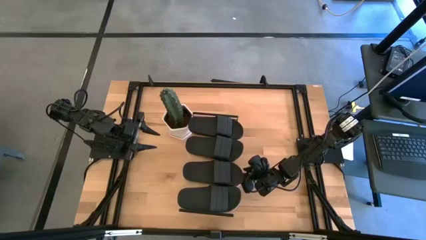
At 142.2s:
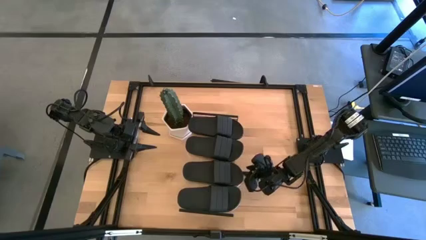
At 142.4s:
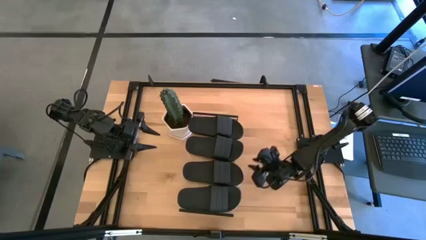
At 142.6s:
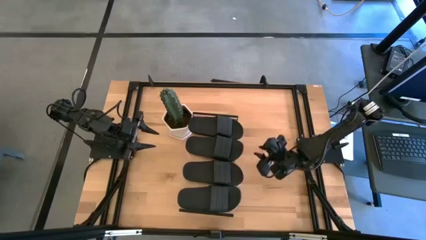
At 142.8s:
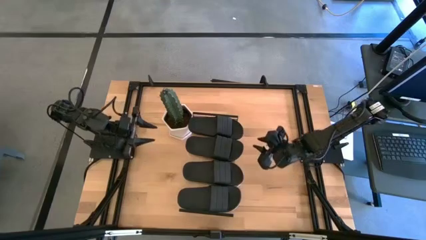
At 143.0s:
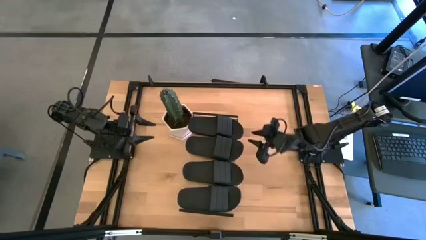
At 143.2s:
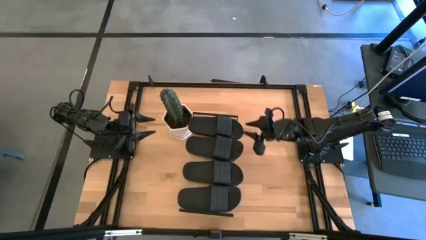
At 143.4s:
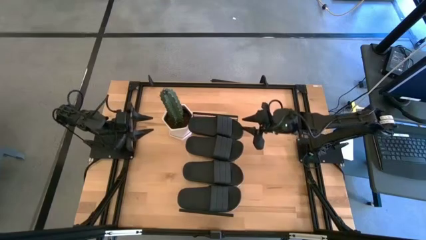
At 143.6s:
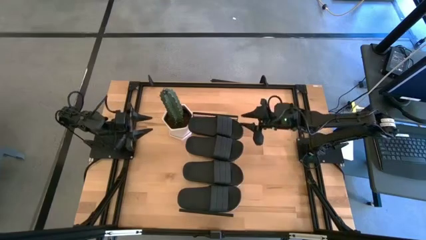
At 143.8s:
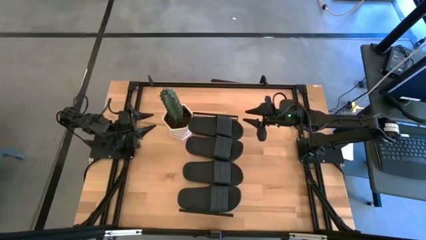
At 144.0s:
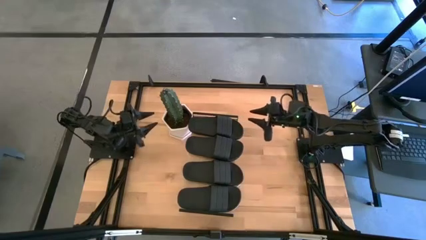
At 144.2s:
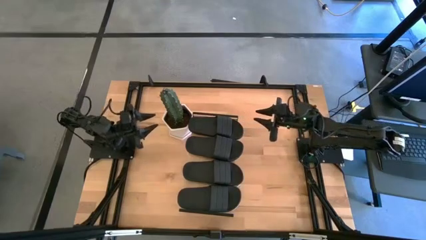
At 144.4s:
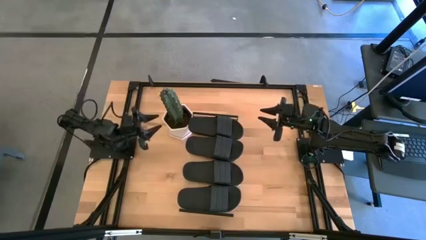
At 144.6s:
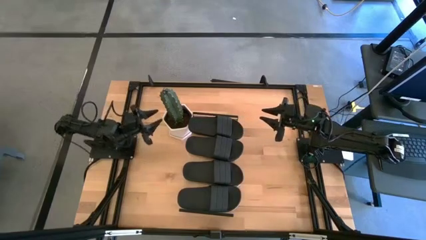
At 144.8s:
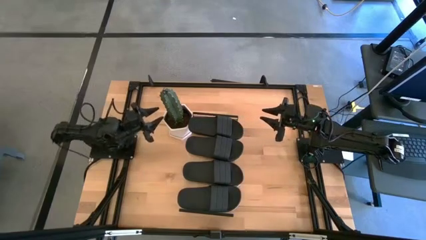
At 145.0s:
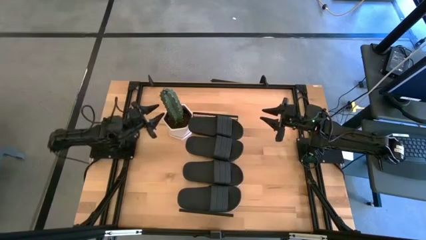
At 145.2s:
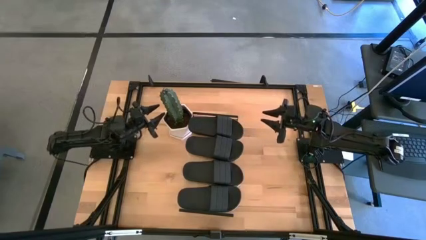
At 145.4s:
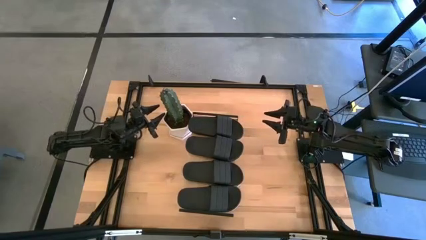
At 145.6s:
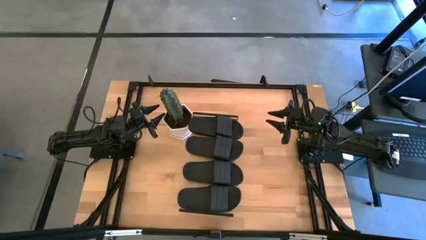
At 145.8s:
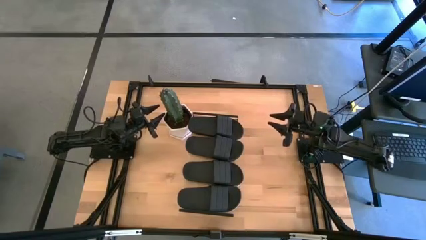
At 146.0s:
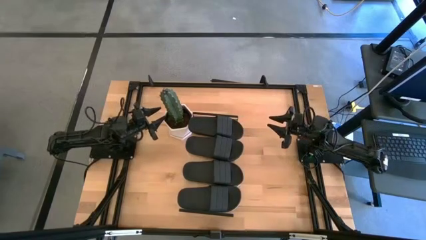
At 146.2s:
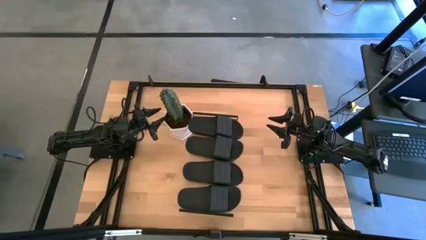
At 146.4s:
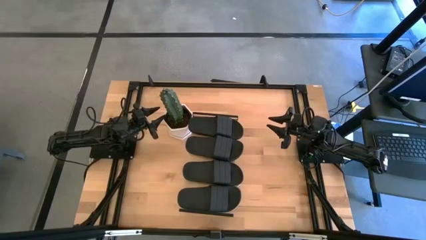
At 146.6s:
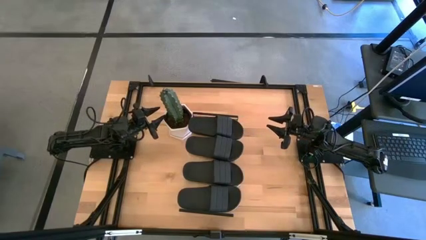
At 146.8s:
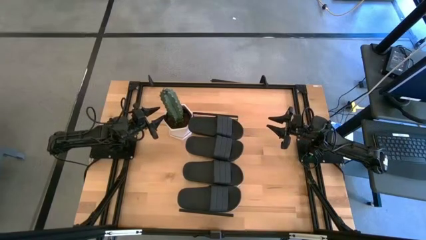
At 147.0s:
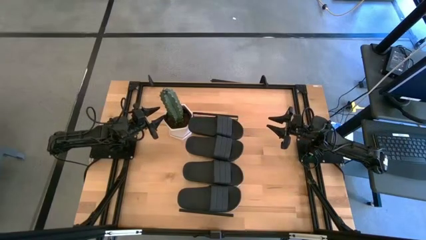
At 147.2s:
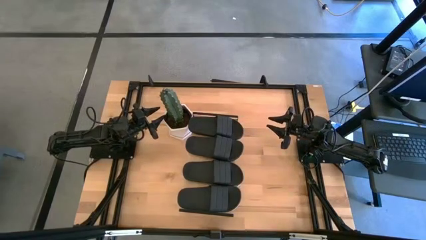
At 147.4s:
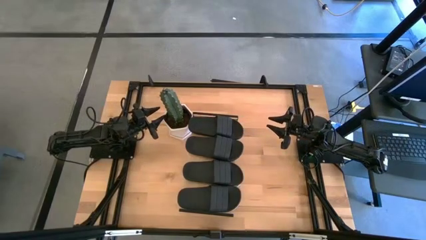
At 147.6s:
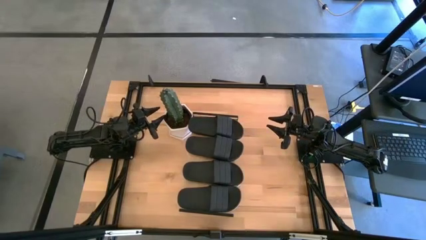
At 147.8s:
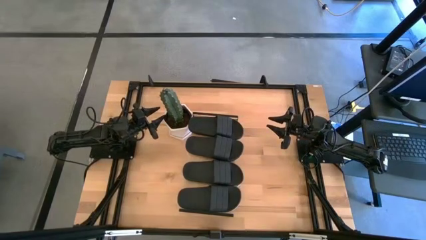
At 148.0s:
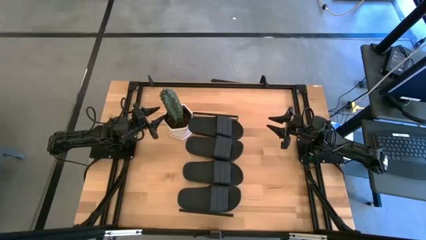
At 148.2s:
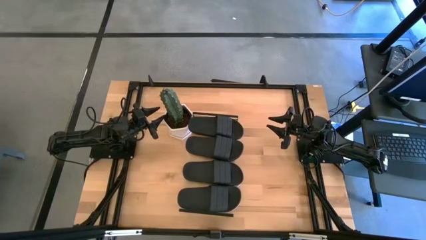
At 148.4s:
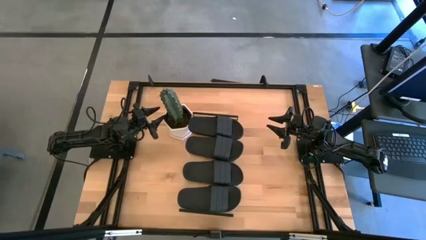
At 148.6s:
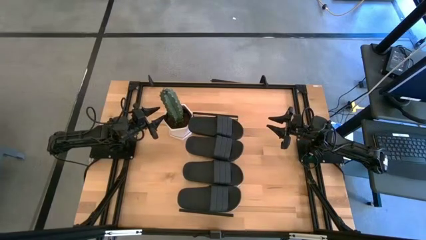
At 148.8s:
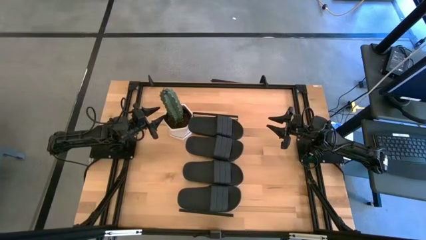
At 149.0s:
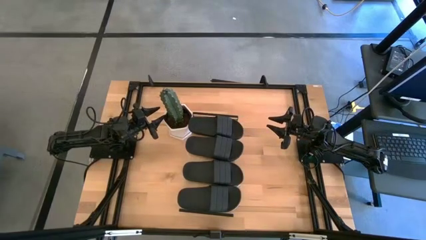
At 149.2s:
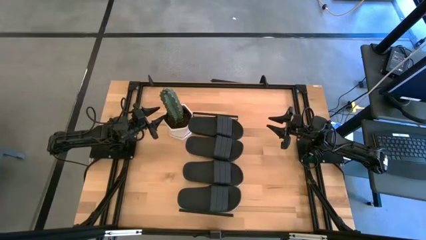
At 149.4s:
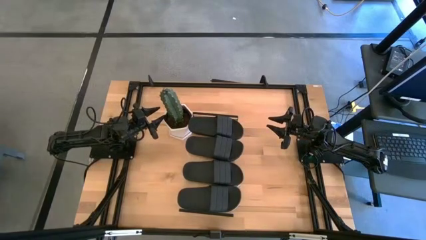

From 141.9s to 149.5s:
Task: Pick and place slides into the shelf
Return to Home Position

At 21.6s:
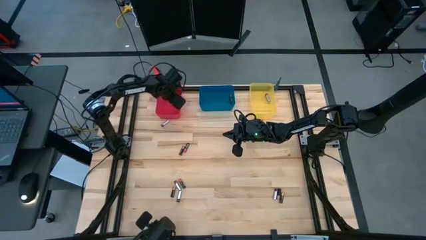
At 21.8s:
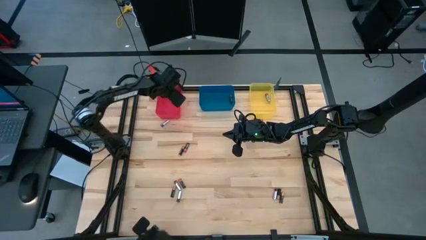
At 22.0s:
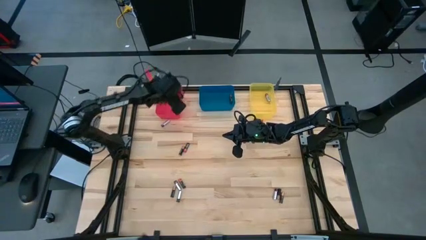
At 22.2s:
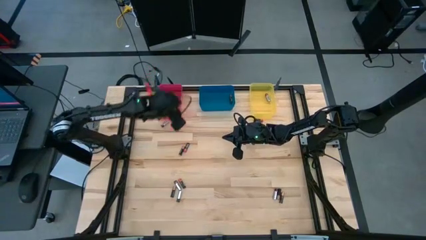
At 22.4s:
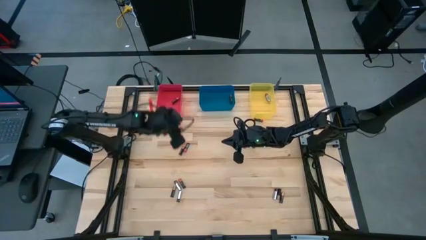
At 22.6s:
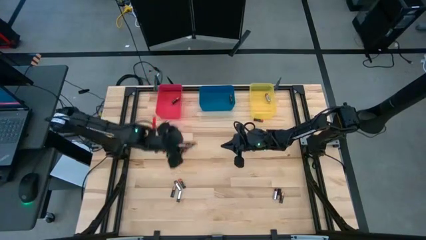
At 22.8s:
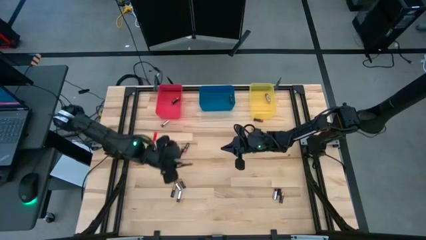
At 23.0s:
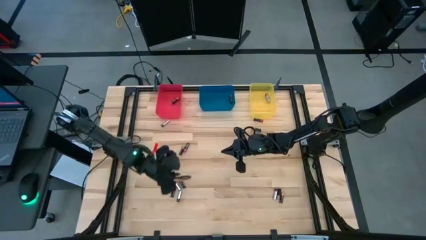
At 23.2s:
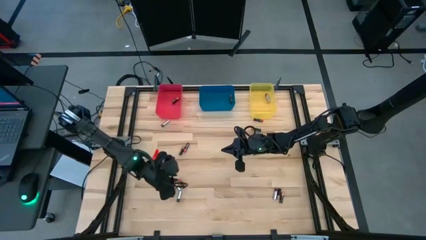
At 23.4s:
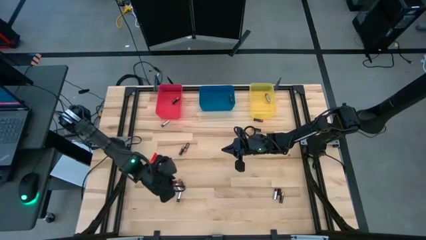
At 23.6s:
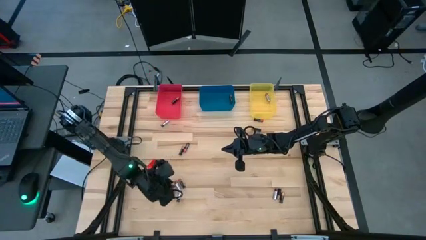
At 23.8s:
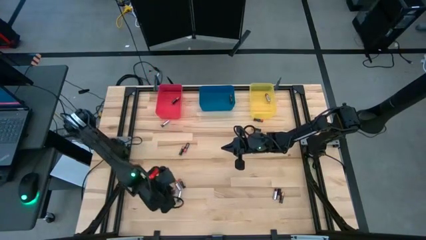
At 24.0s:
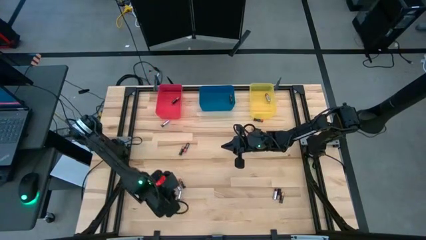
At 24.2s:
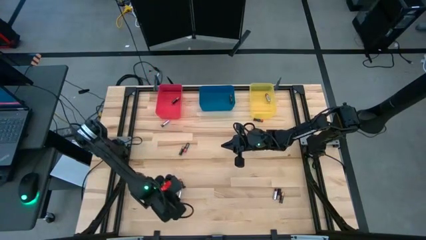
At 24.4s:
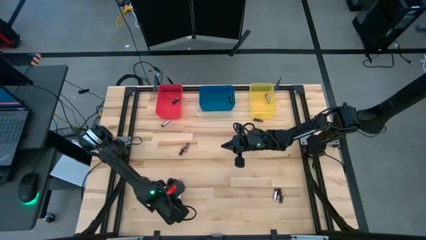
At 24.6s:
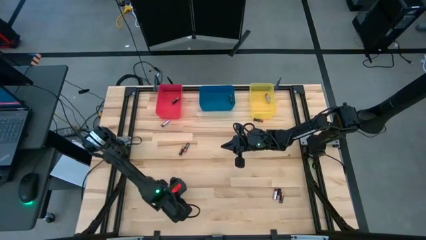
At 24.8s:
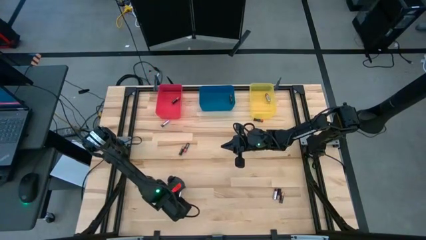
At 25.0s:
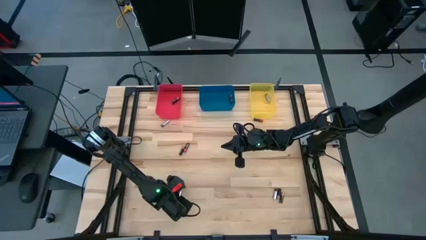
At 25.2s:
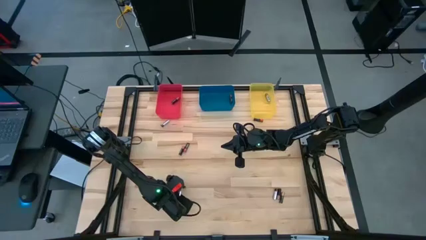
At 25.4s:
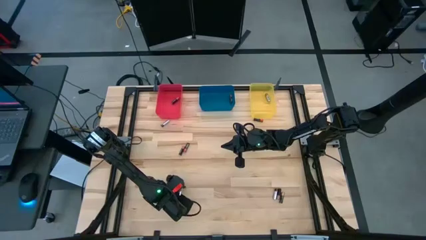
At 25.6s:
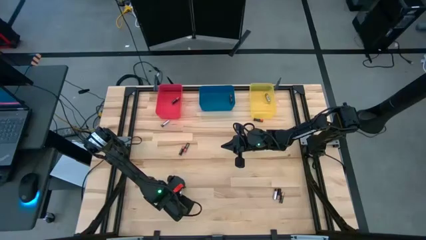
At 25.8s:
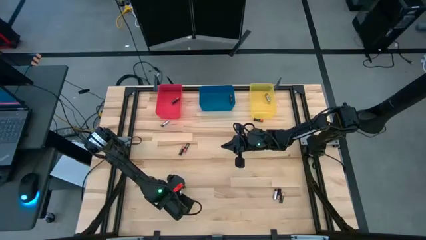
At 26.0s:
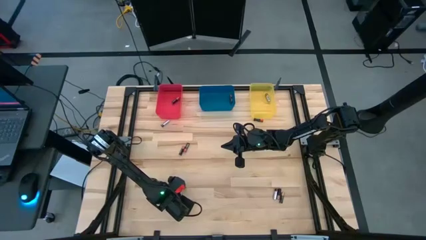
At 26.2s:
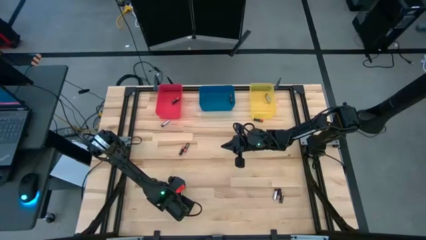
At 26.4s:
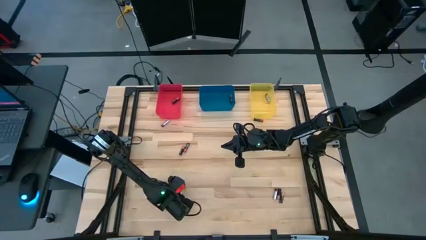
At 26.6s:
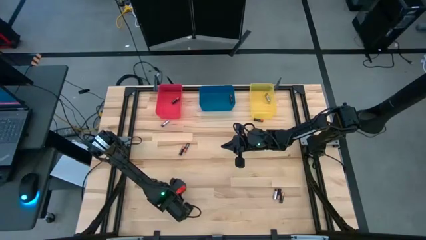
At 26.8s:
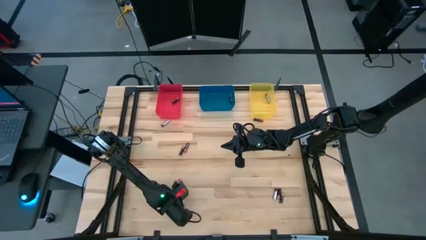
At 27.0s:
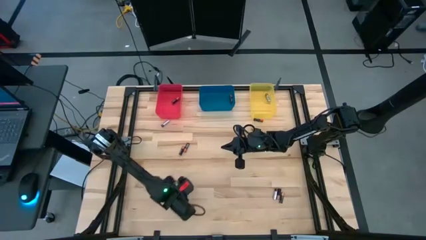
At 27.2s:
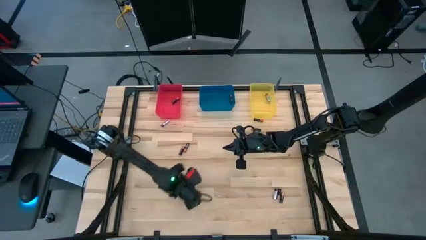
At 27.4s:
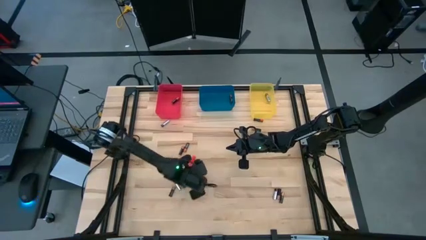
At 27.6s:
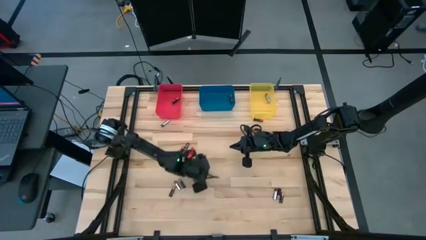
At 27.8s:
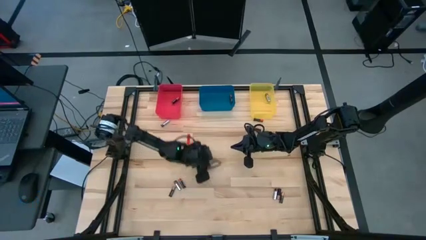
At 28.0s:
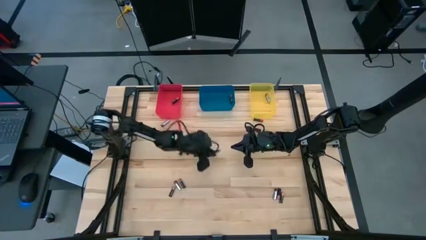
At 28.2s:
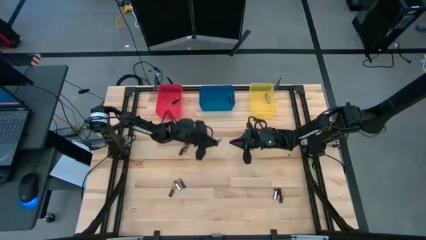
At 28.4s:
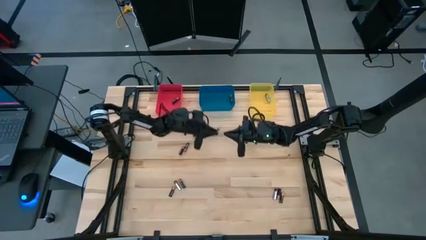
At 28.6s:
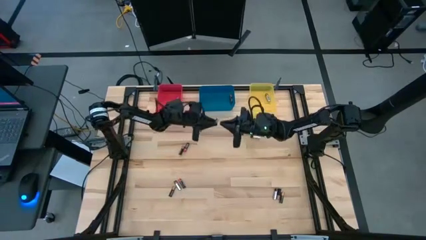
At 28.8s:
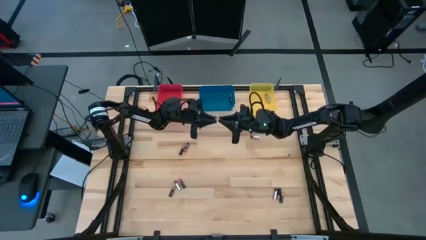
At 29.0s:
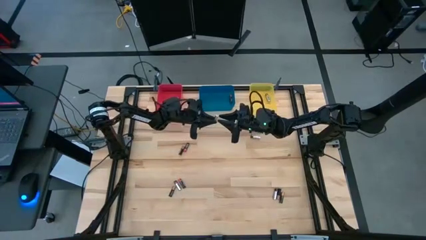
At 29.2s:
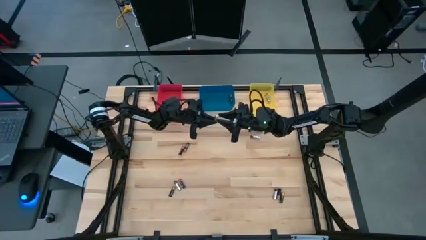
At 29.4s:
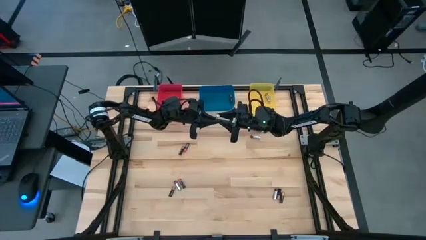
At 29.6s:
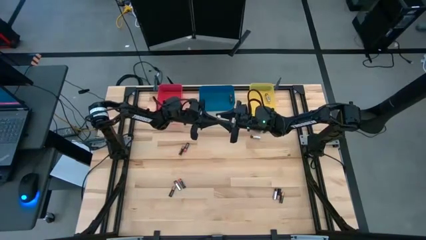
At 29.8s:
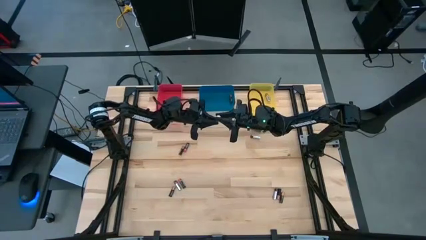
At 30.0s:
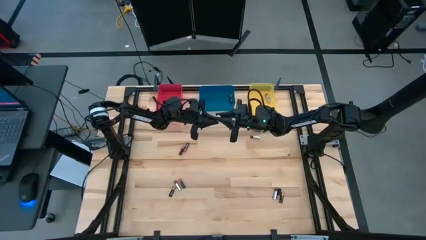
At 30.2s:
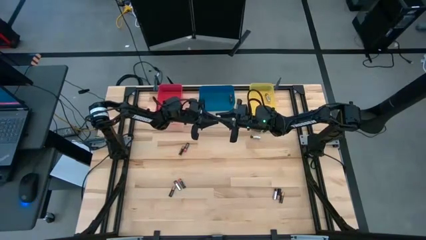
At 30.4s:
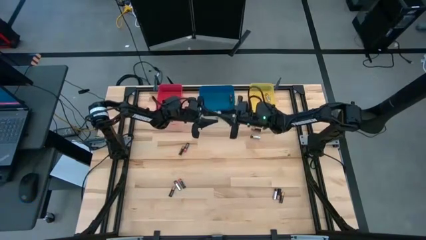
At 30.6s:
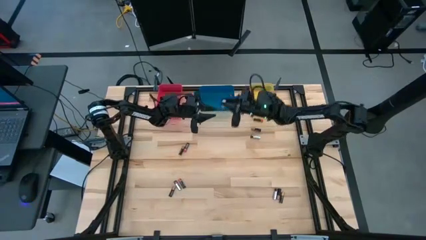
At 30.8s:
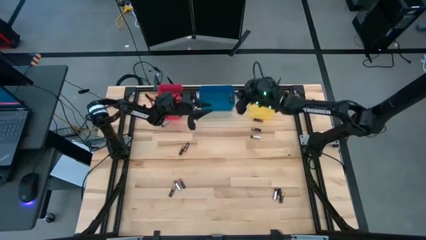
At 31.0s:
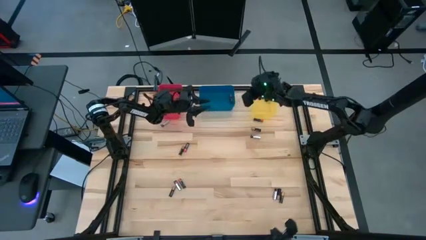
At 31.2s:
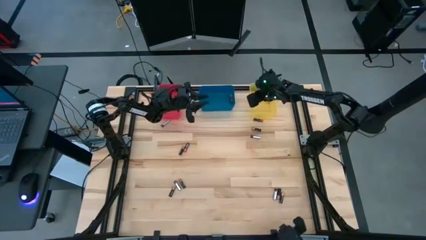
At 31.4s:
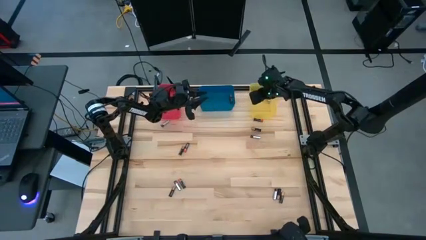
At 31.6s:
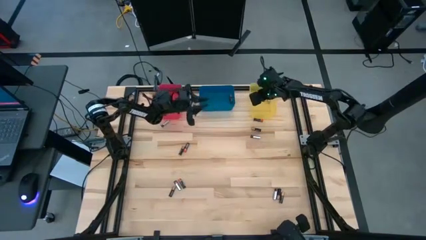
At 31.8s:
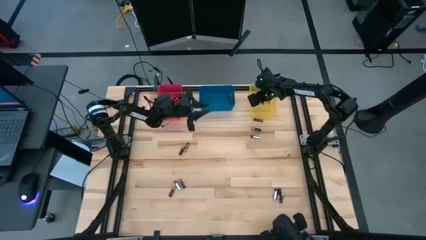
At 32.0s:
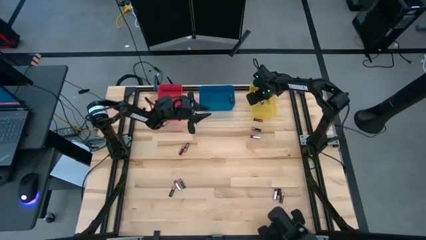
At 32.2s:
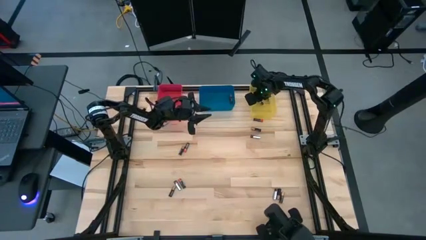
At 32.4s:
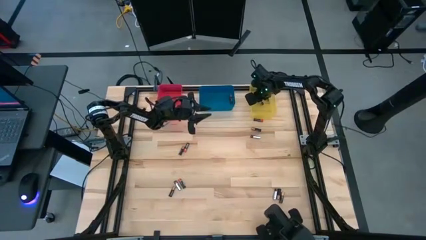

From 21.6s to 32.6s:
Task: Sort batteries
Put the silver battery into the yellow bin
